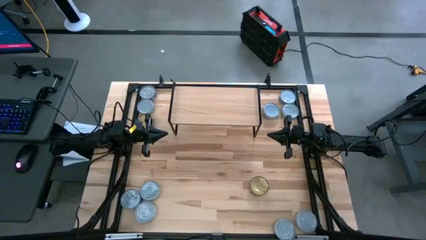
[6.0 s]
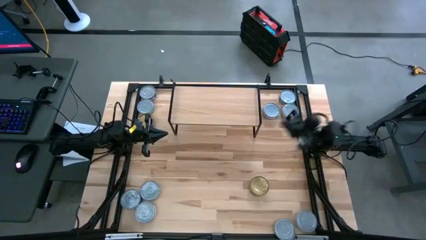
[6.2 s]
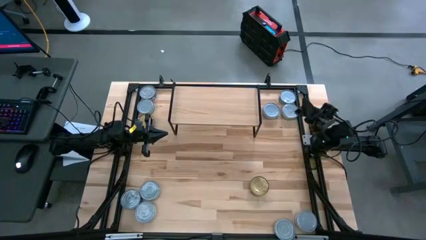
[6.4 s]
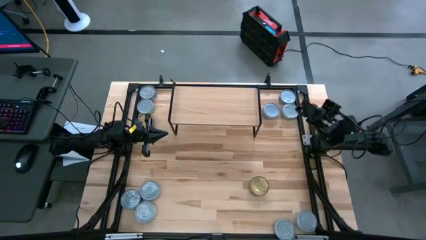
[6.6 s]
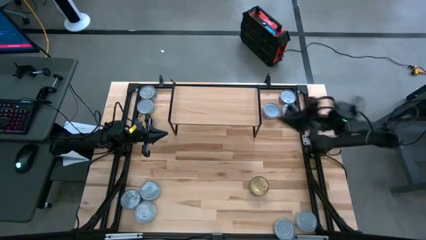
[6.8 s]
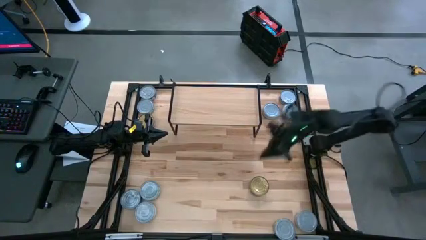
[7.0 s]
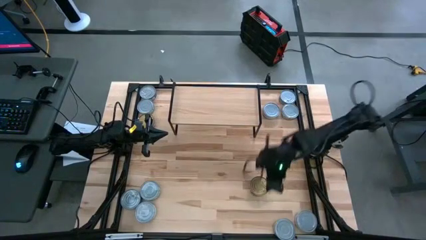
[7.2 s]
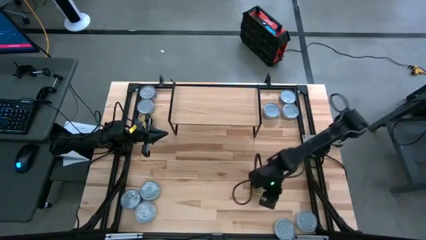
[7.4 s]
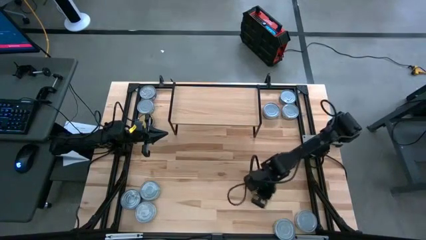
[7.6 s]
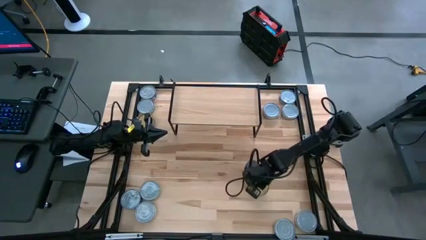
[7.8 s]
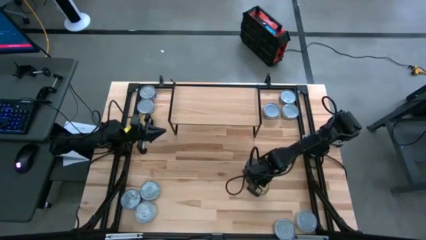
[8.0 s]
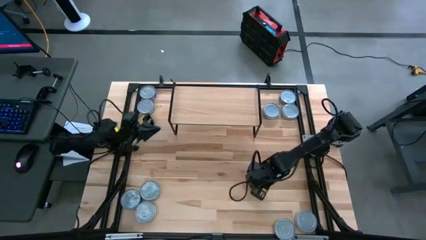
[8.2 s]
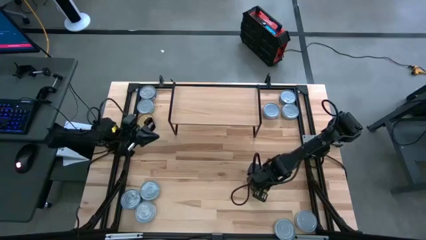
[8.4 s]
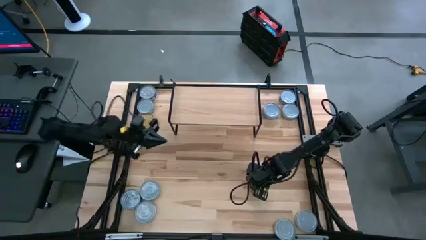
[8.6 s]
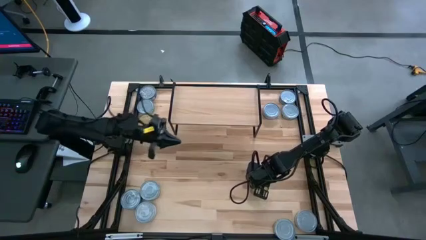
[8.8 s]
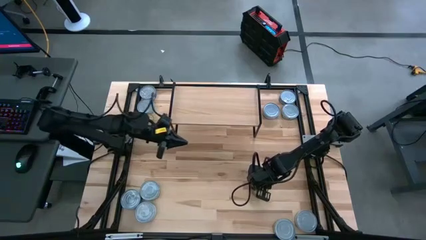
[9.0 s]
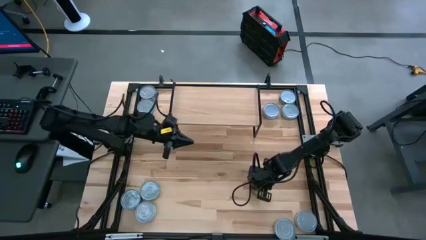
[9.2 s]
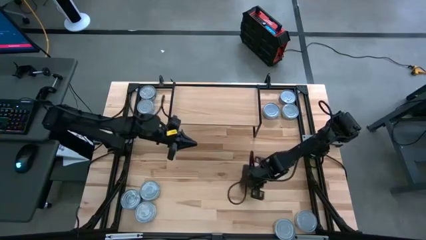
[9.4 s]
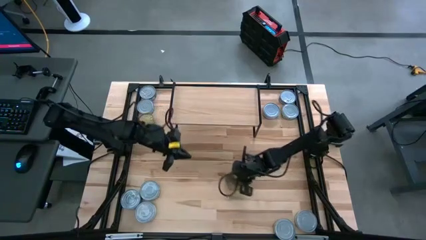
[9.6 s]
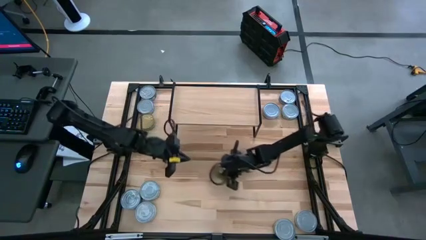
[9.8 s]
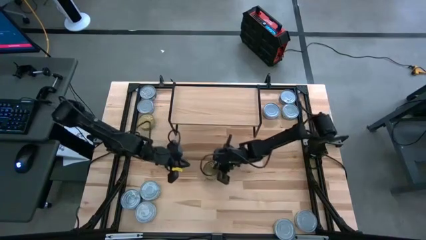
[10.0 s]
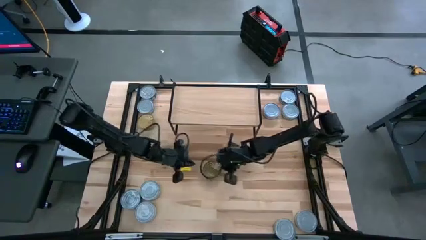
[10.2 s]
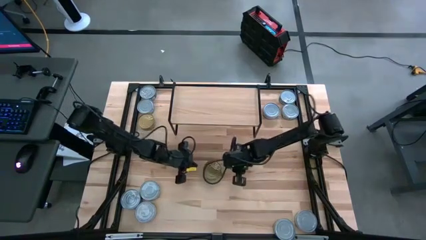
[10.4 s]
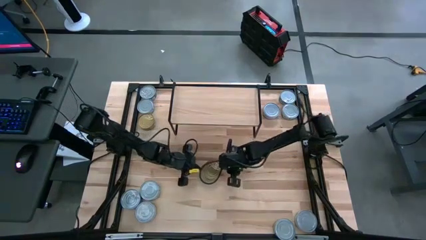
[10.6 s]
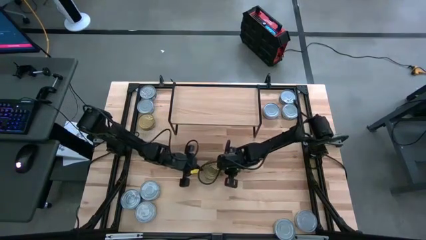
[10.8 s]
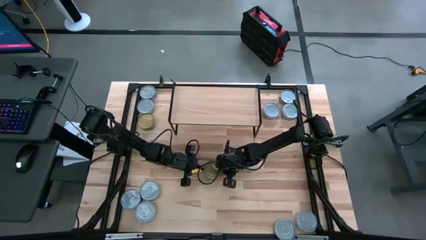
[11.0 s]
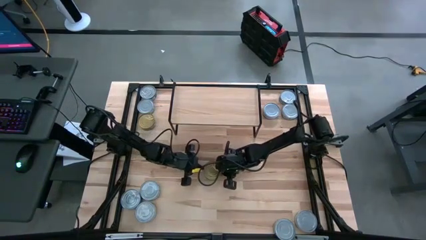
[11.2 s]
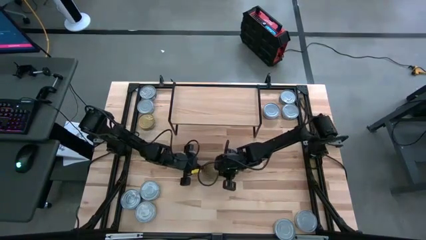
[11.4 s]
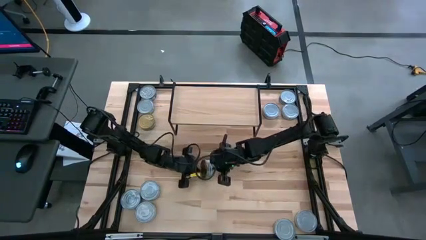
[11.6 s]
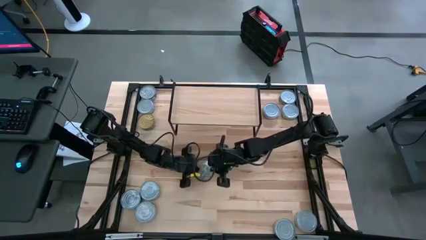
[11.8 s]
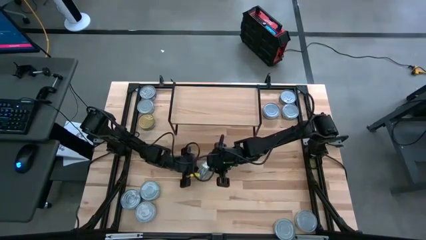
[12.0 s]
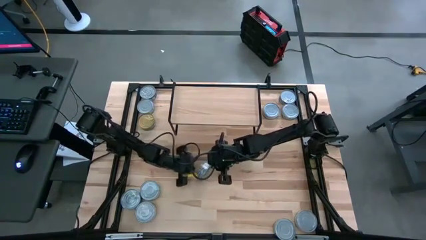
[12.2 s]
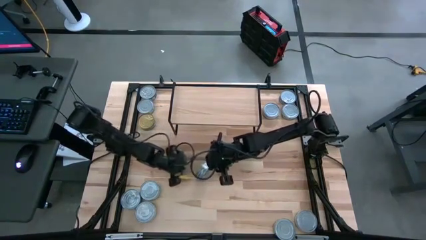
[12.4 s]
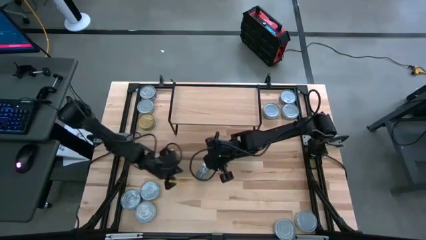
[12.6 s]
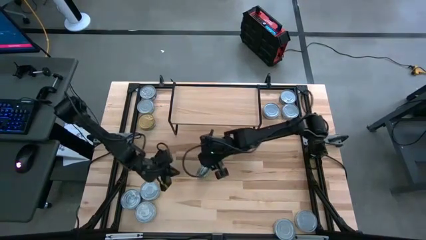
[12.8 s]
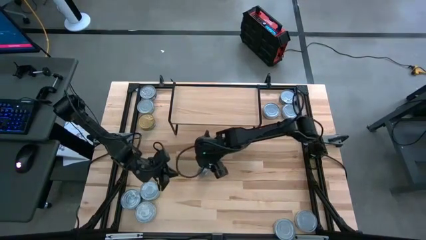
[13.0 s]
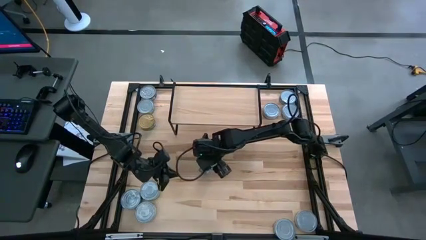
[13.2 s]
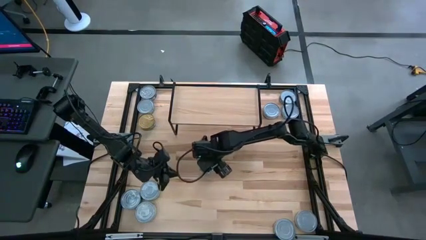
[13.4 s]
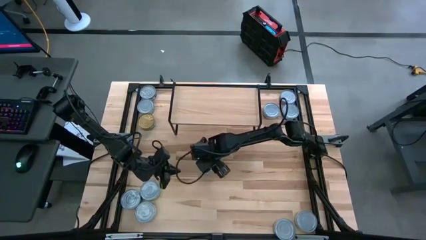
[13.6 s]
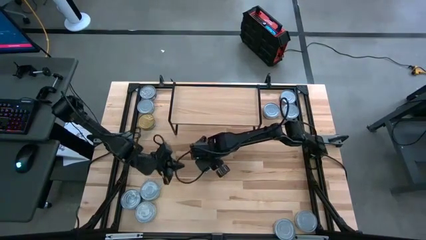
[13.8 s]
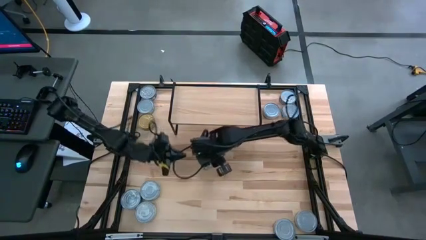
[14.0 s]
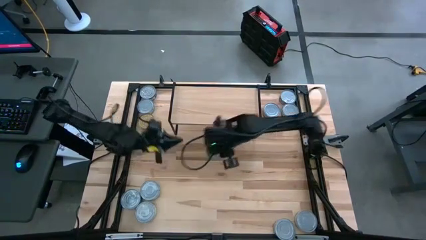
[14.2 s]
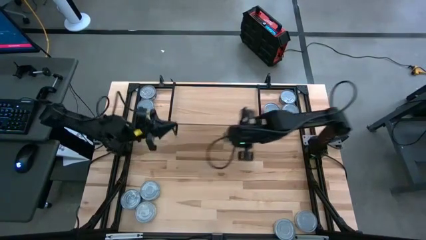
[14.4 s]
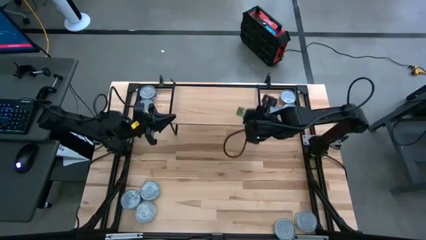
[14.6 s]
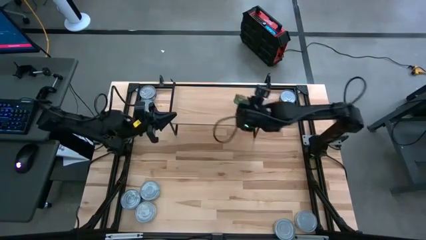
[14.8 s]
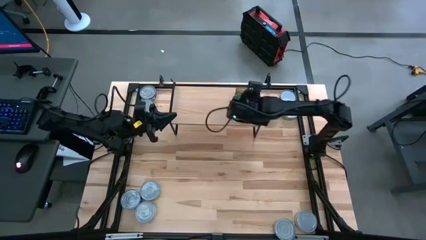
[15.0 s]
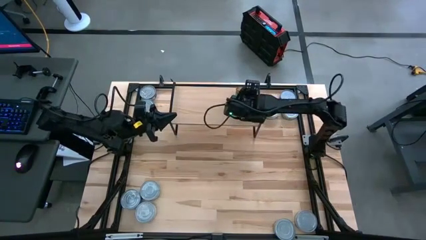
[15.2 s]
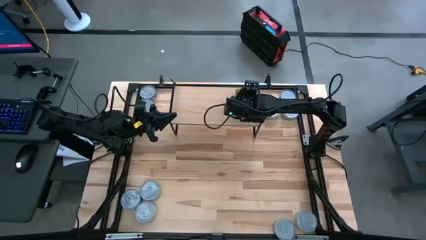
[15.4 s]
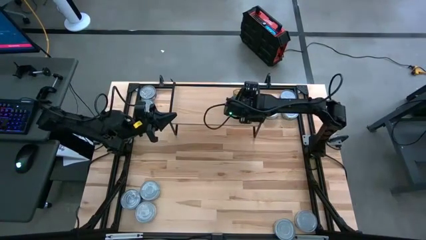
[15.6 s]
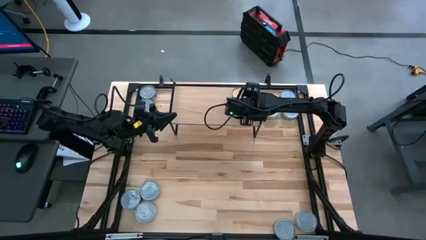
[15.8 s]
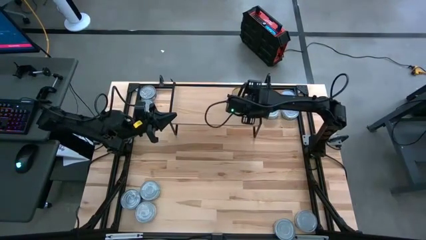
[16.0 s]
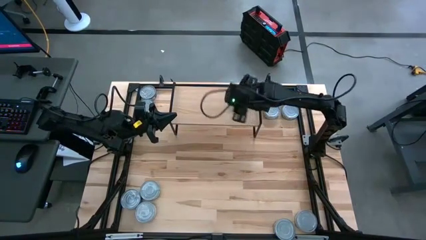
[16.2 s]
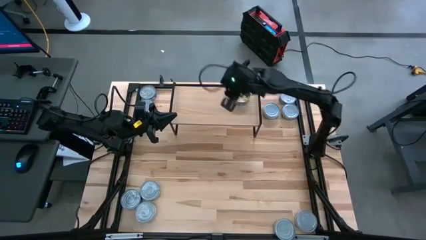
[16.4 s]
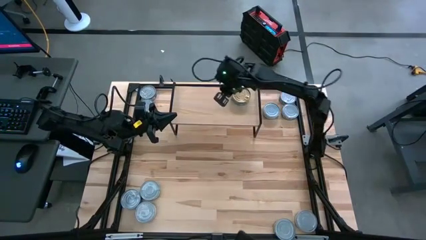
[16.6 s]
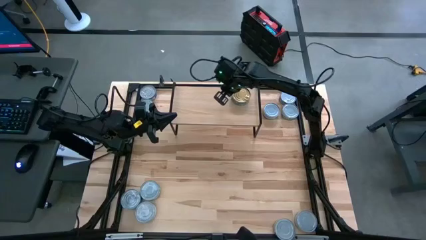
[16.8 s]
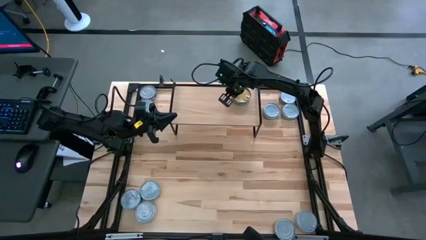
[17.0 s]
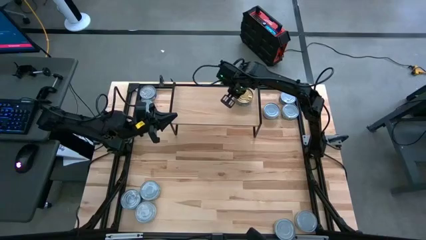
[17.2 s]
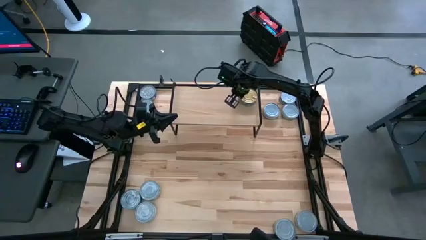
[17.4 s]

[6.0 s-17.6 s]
Task: Stack canned seafood by type on shelf
Put the green tuna can on the shelf

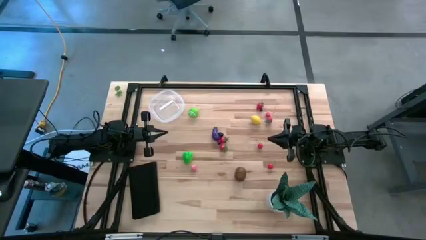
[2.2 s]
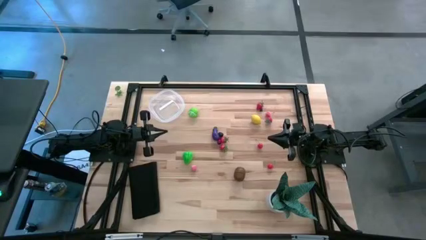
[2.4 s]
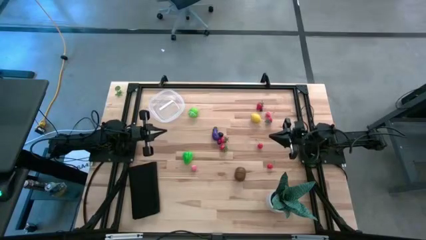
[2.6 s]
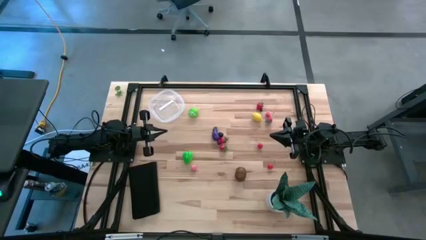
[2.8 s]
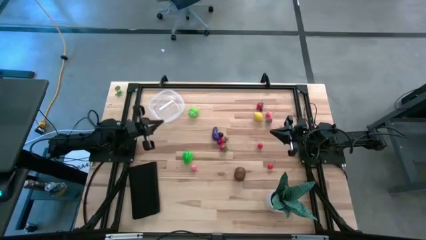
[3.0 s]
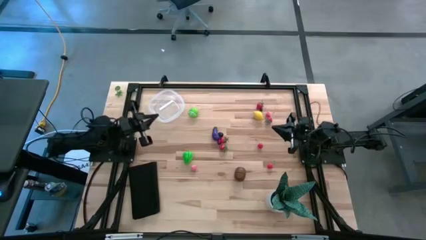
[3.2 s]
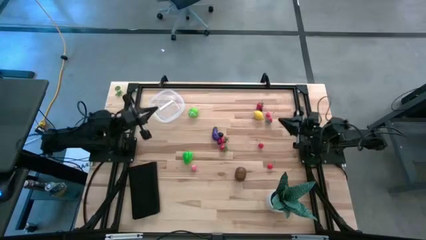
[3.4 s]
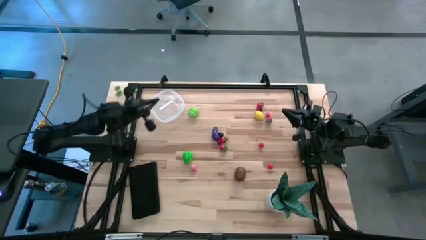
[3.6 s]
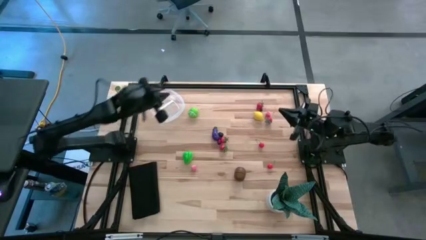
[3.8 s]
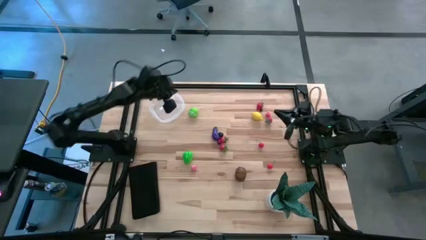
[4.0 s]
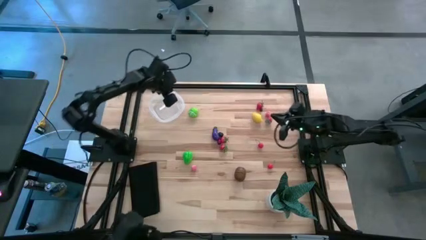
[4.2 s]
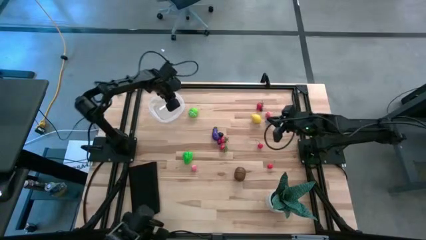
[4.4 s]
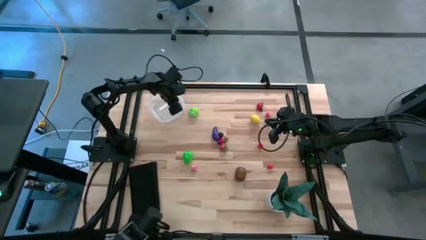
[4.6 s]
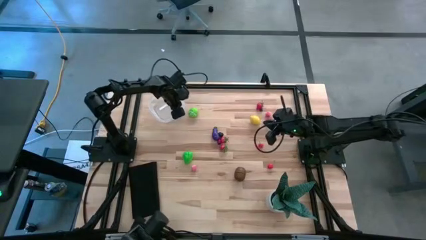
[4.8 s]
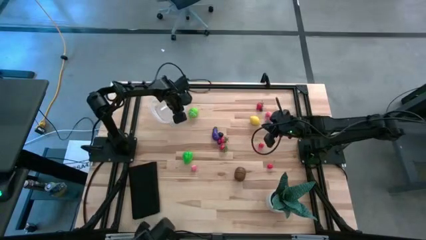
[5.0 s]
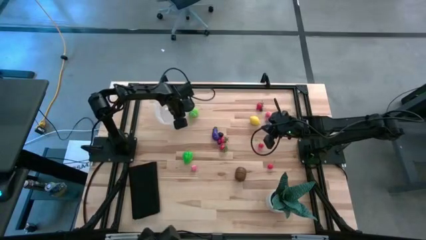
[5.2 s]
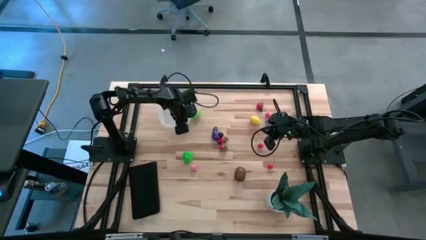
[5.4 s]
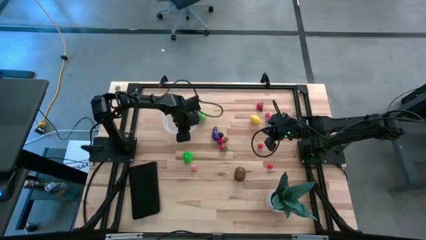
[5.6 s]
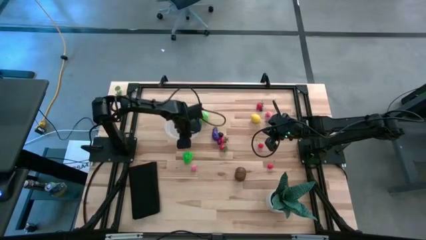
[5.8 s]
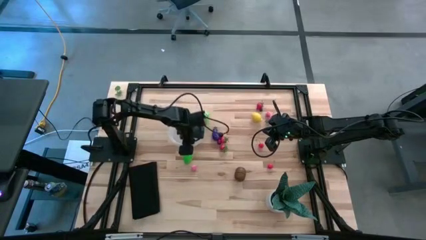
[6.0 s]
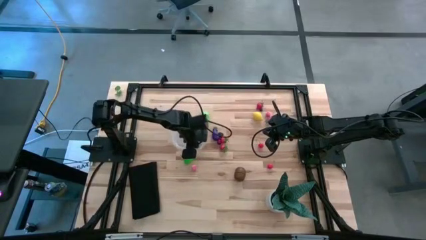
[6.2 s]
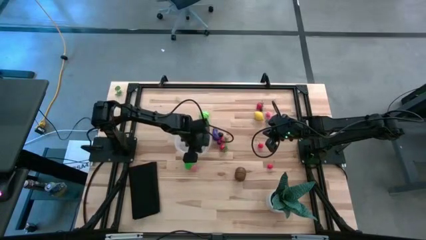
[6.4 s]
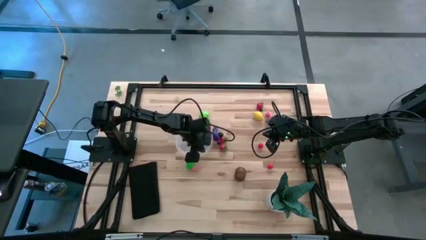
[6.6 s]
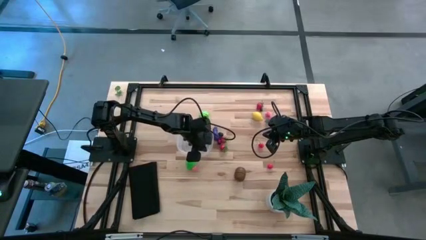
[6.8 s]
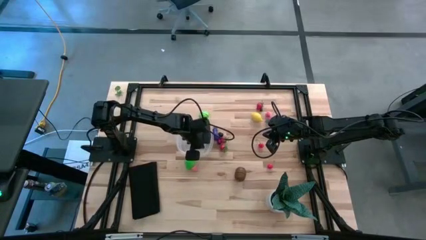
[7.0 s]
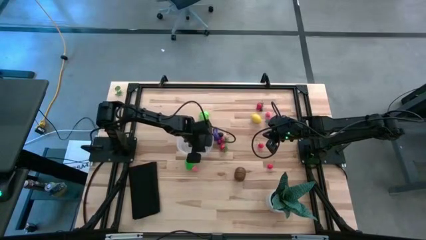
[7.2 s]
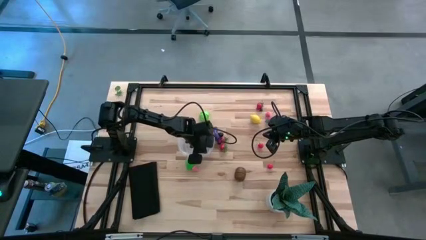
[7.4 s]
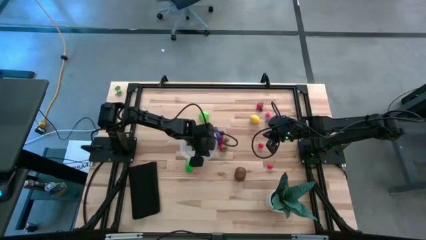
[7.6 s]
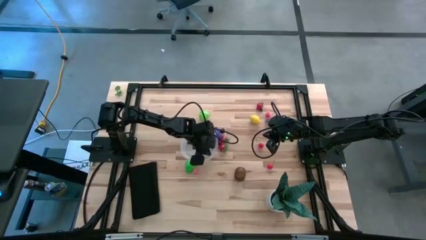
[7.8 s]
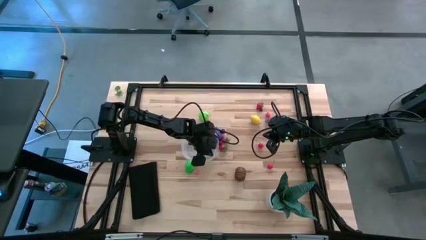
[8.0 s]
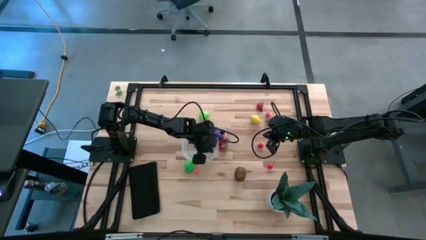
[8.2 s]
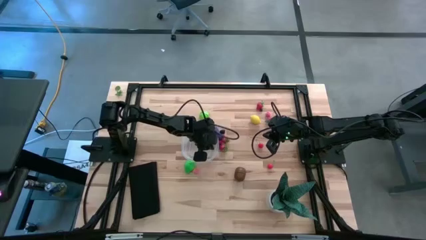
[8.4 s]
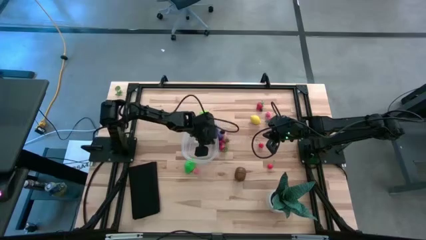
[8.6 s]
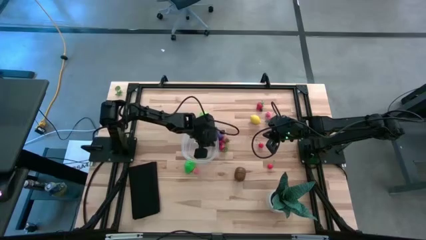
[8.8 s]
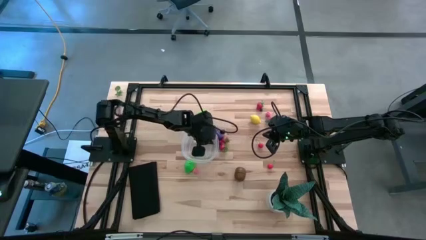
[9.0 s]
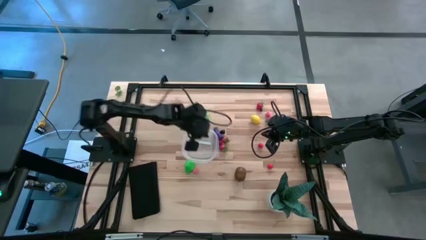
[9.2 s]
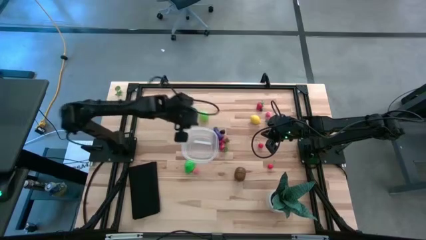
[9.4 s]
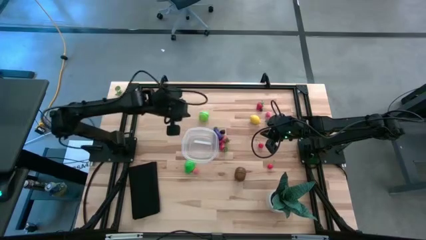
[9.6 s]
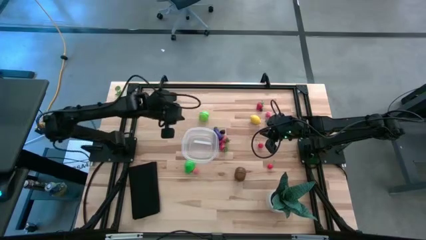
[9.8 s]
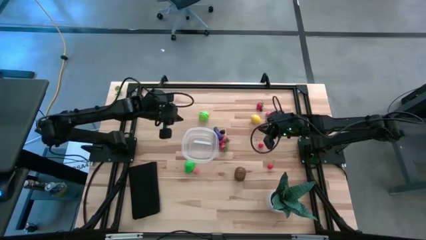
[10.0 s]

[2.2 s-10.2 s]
Task: Pick and placing Produce into tupperware
Prepare the transparent bin in the center of the table
